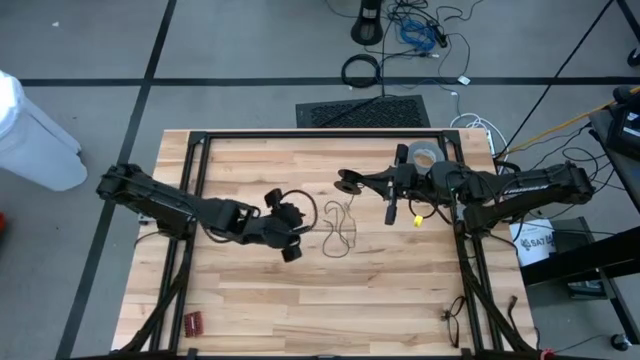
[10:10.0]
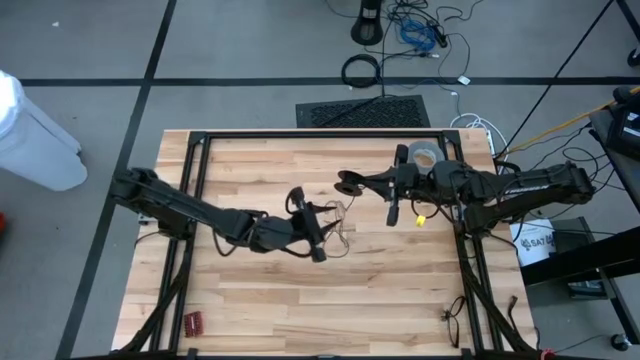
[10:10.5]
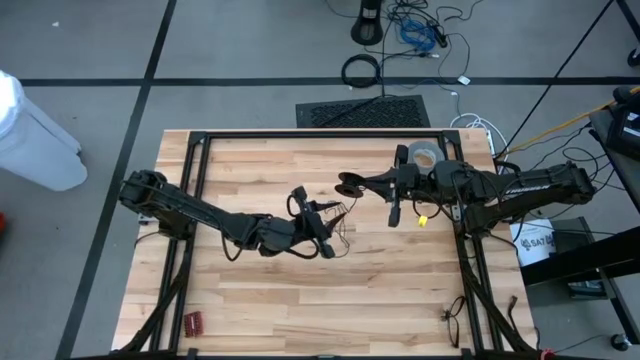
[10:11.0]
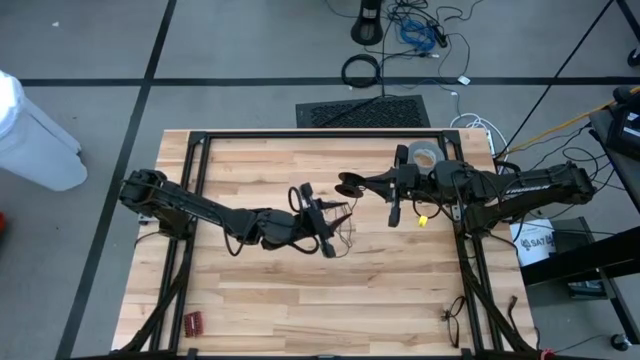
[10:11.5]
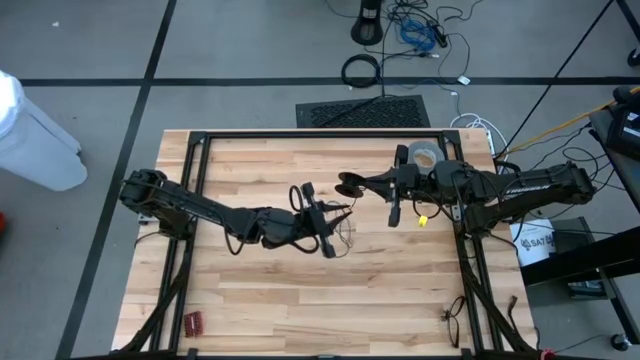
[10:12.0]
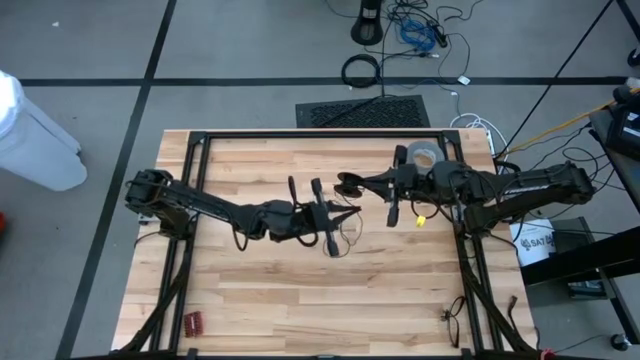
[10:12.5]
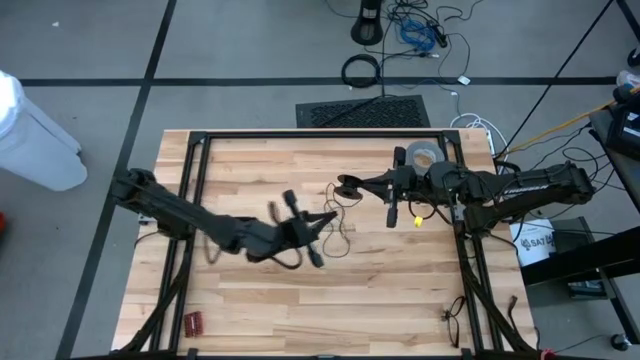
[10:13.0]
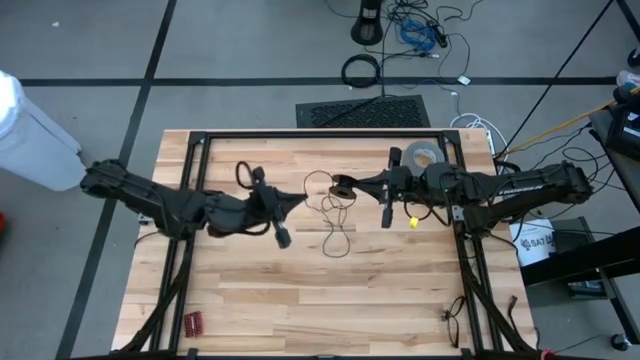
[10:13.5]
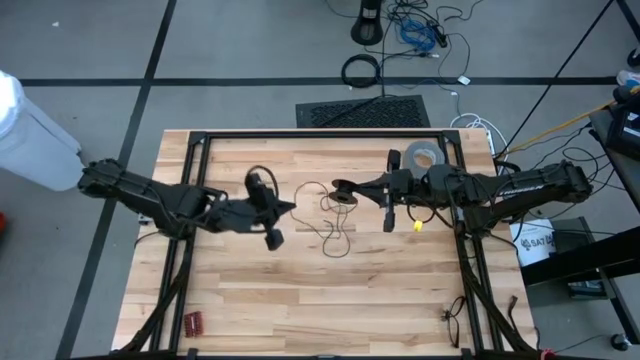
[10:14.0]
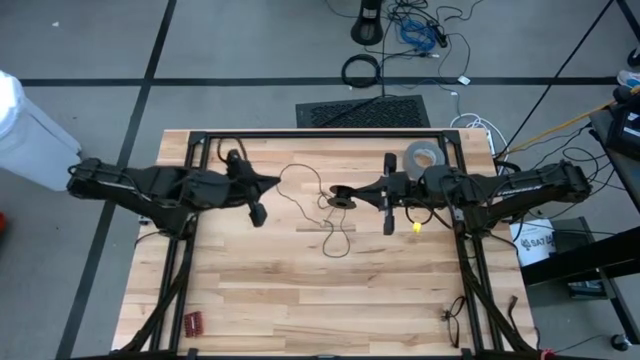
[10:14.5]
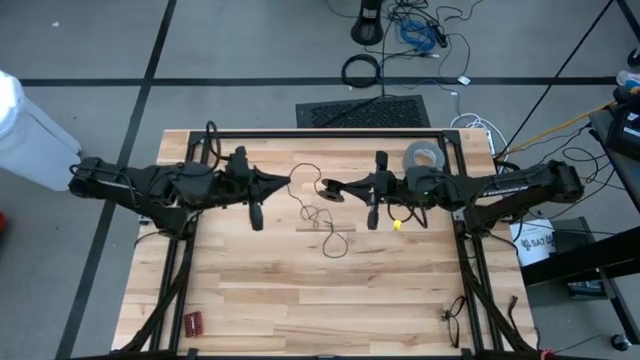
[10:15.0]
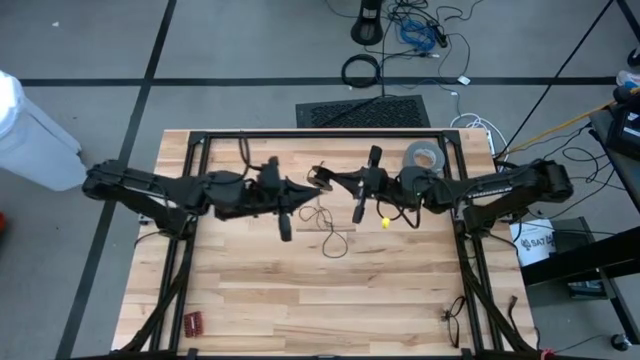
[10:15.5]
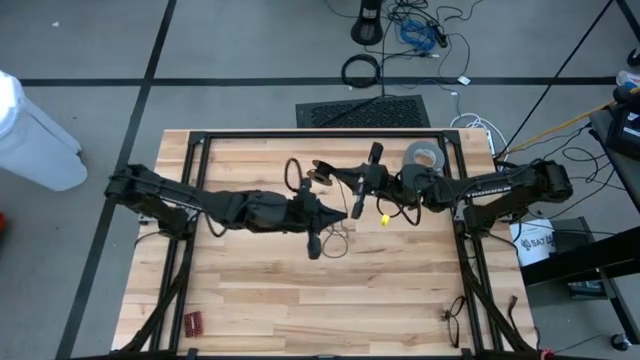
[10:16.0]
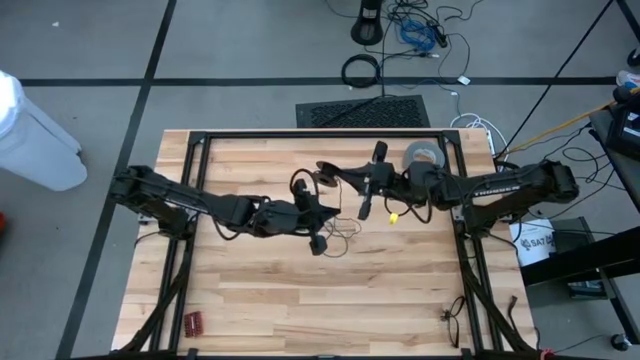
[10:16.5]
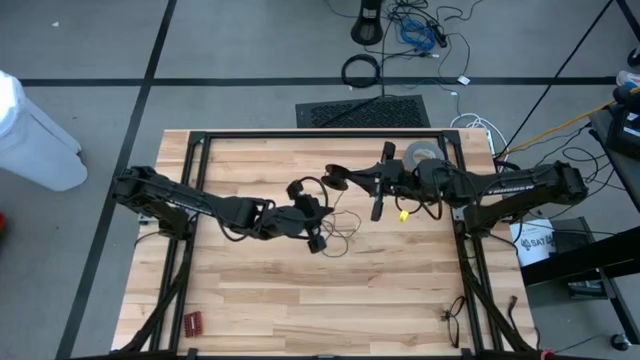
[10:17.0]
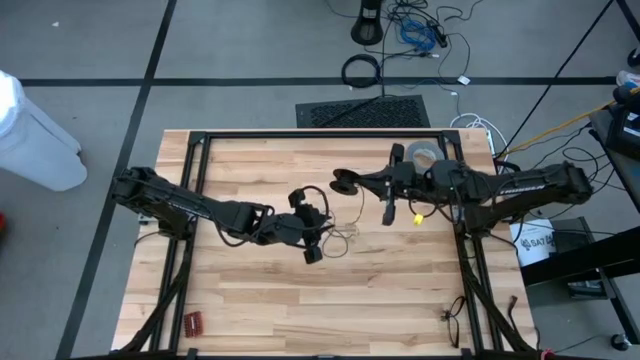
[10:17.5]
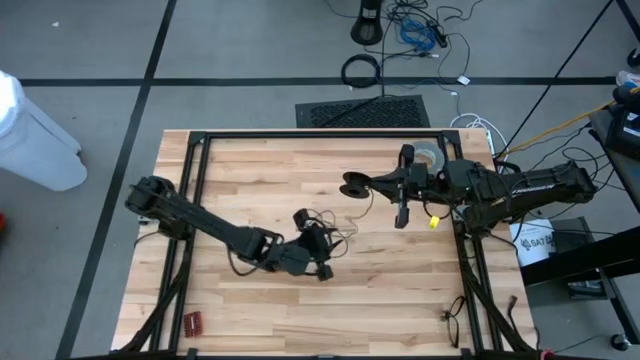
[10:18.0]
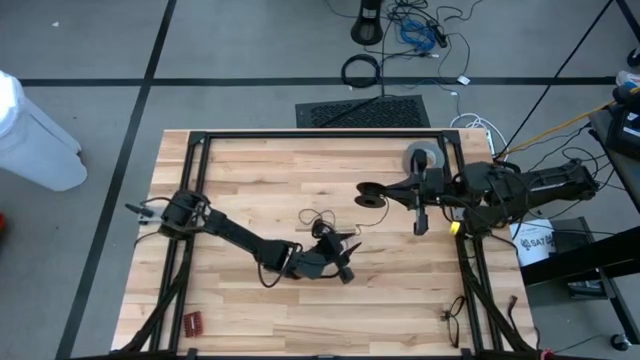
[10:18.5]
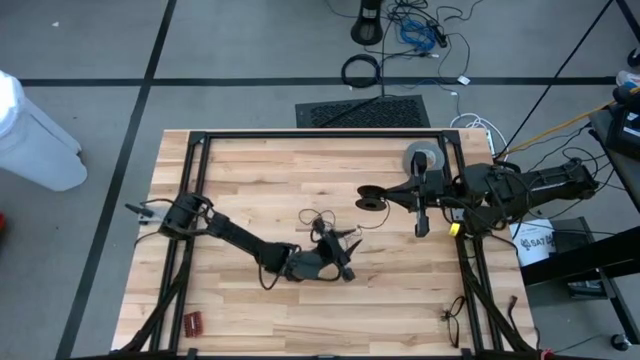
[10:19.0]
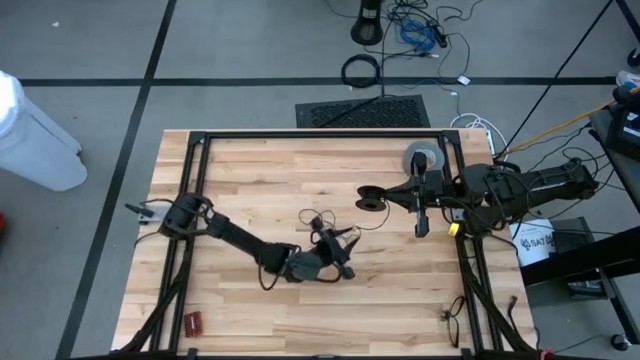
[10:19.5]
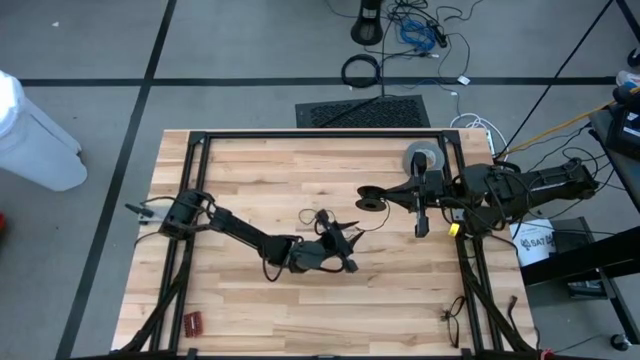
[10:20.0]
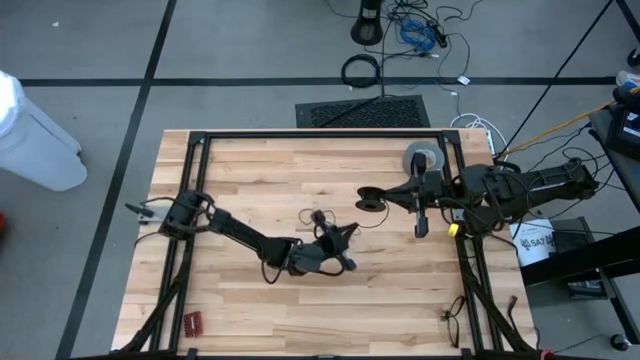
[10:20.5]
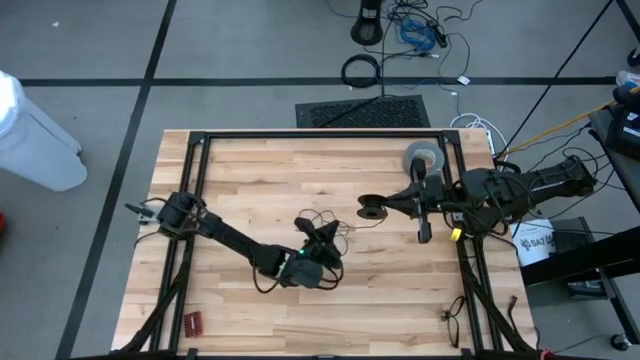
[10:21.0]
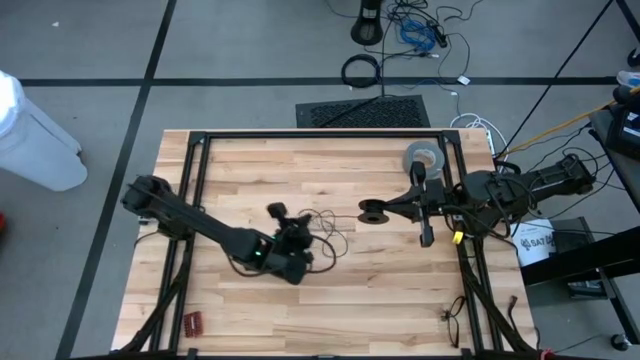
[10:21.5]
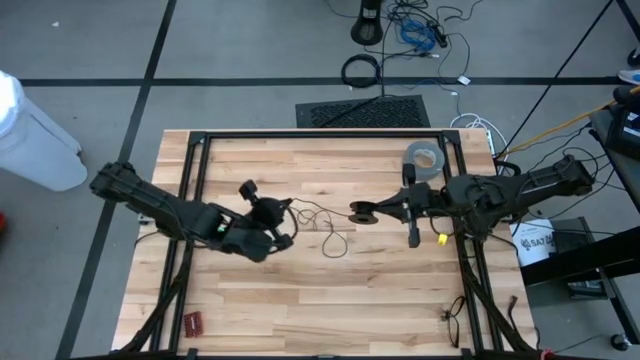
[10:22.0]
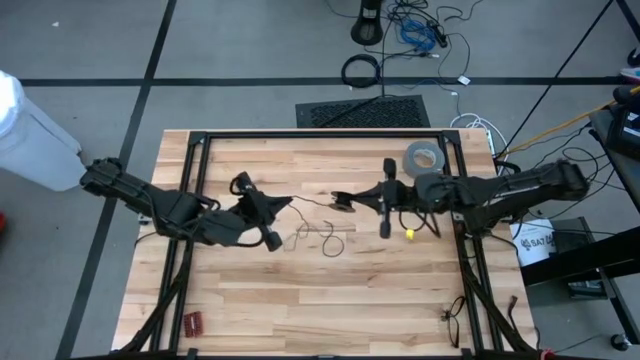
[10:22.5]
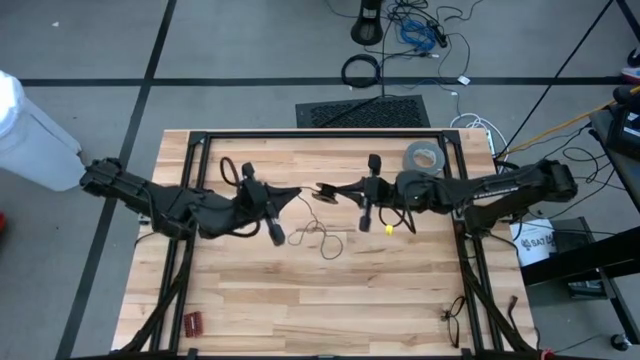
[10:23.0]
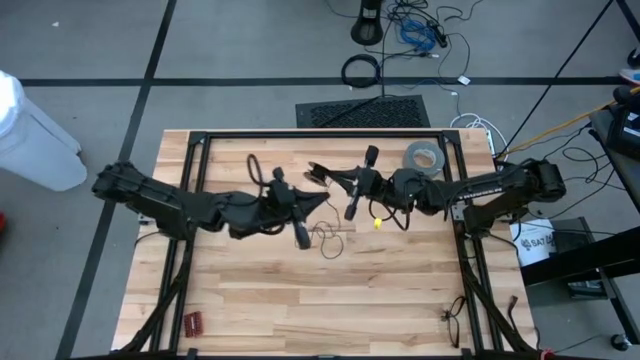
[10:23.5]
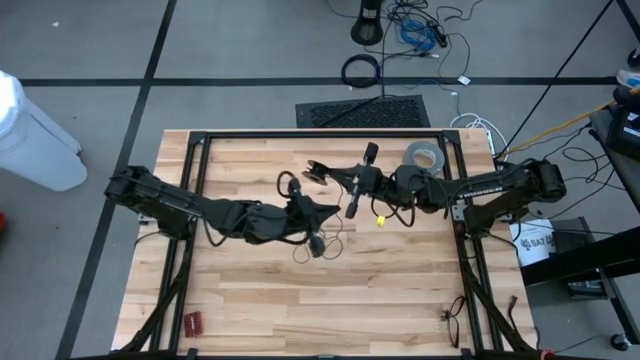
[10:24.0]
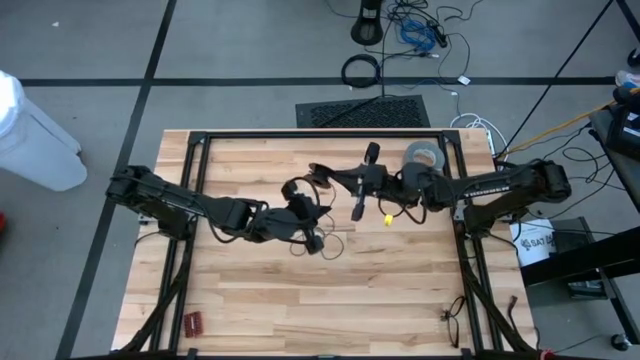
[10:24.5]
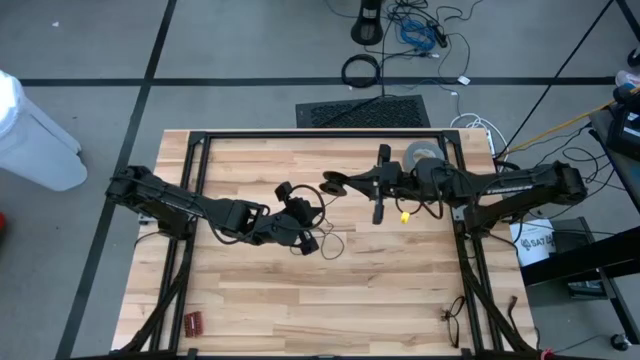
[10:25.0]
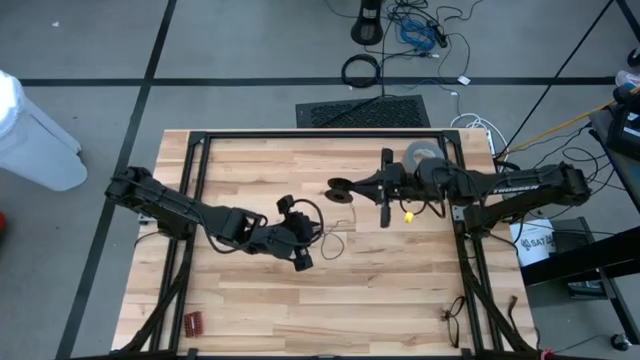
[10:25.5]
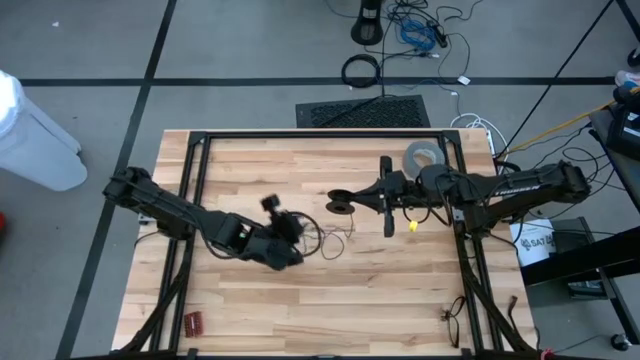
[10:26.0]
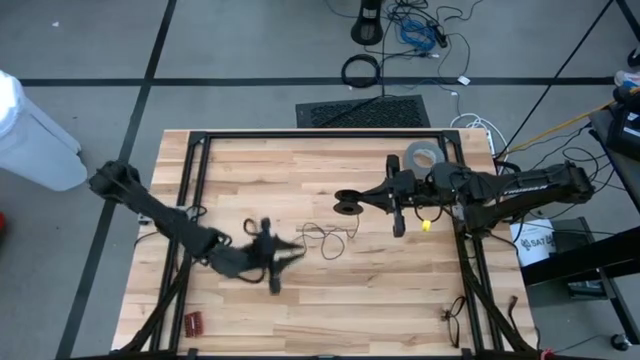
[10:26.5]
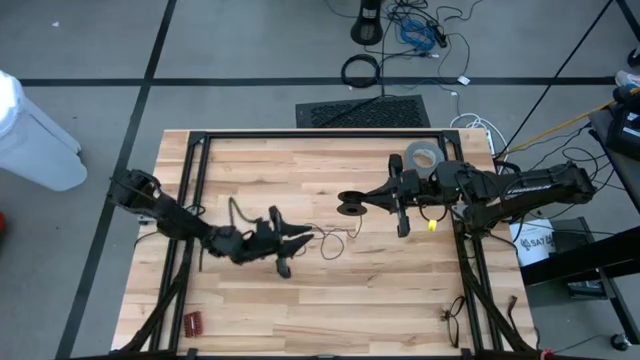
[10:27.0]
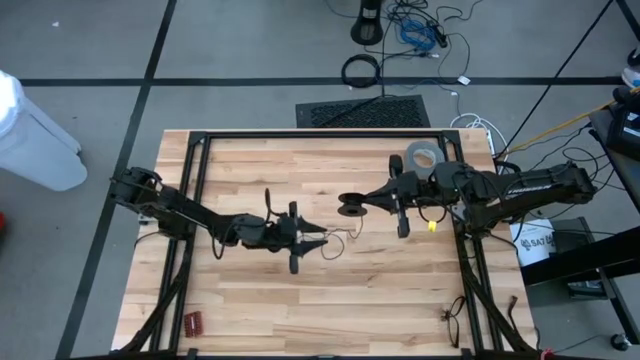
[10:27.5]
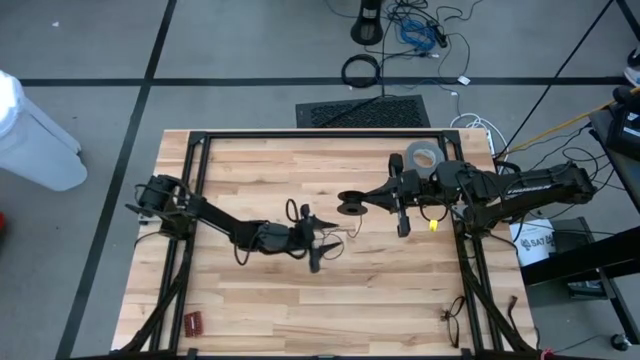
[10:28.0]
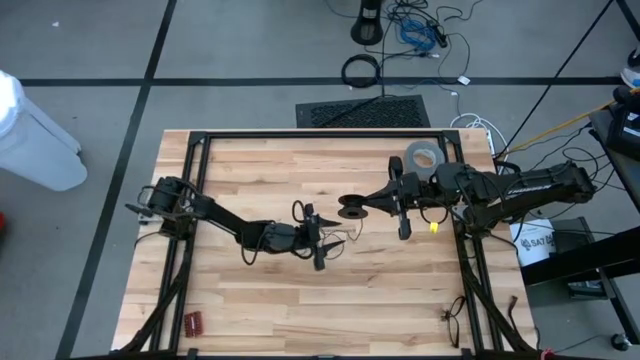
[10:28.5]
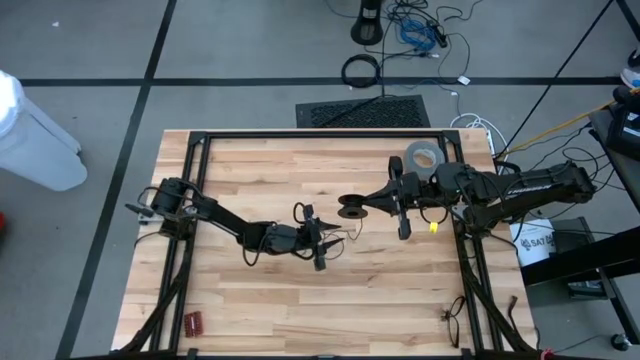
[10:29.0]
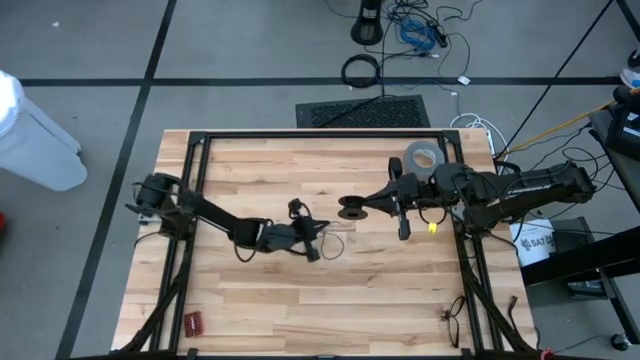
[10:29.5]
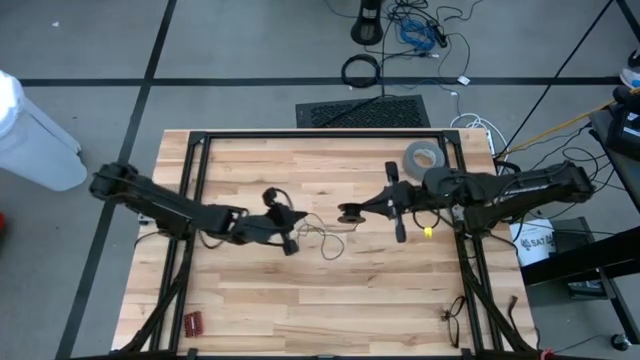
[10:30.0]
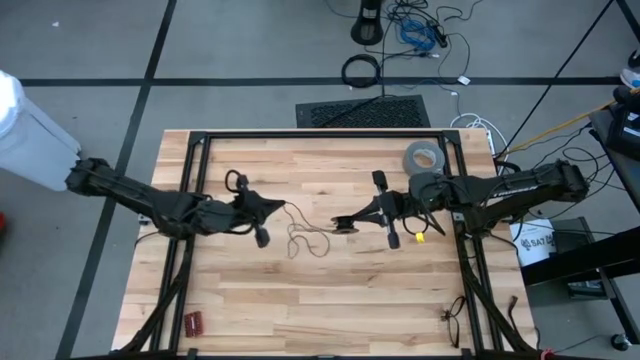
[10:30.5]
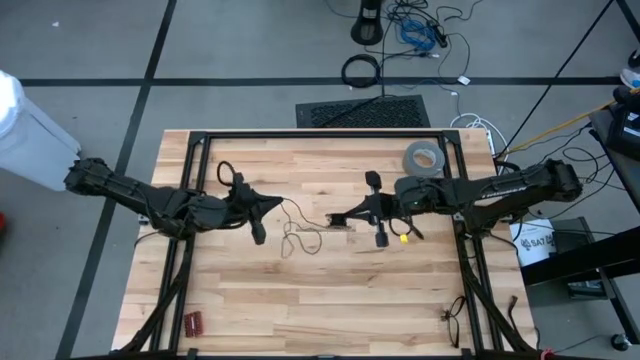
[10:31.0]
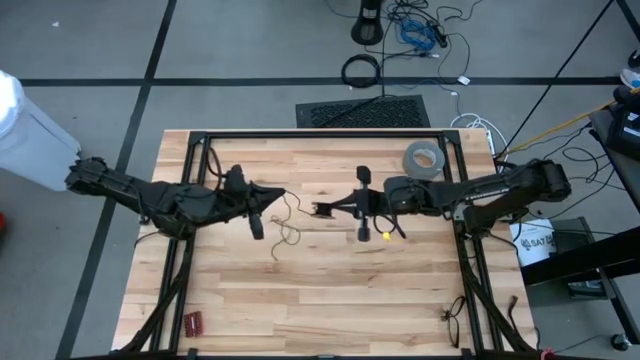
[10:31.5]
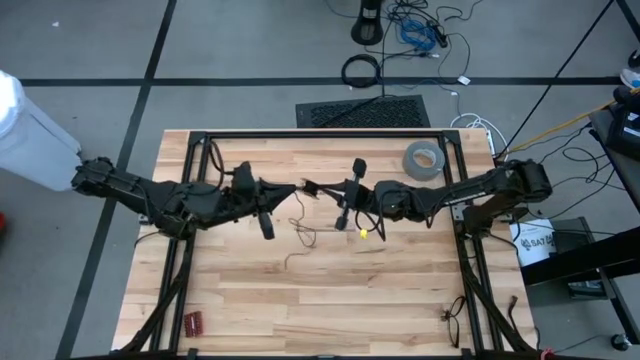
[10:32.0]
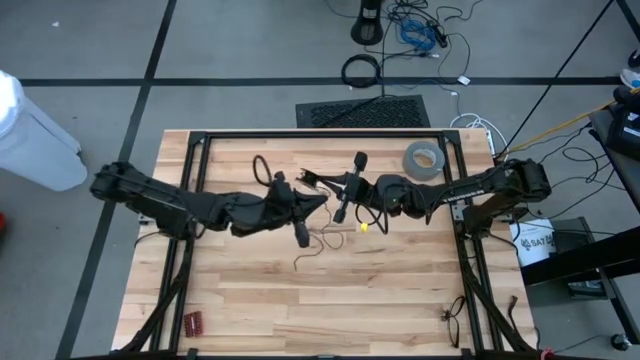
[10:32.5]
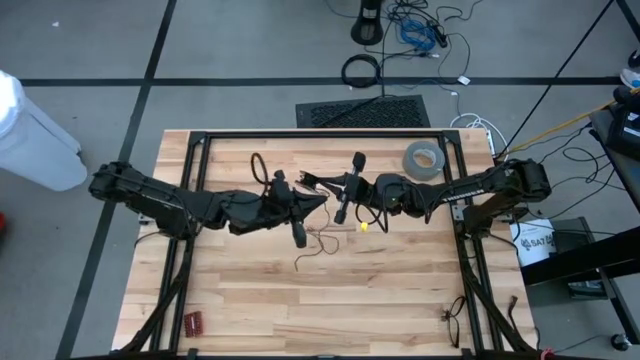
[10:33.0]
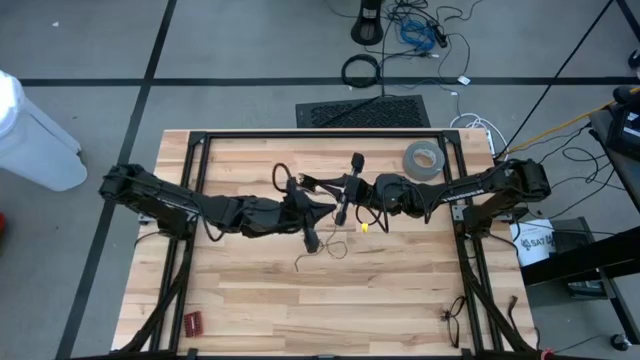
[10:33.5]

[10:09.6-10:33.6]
Task: Coil cords
Coil the black wire onto the spool
